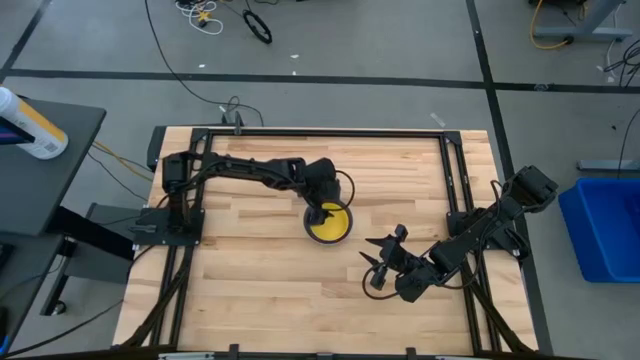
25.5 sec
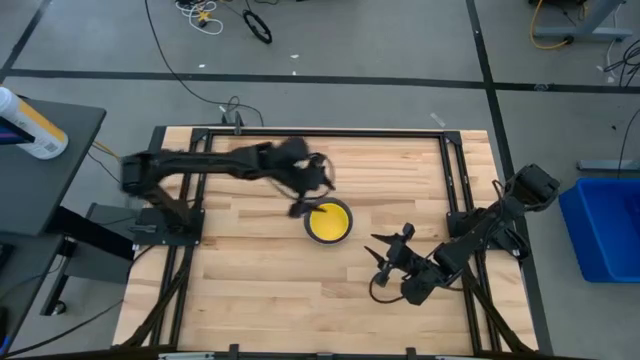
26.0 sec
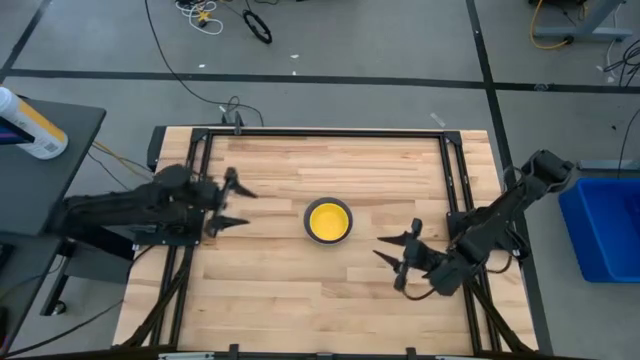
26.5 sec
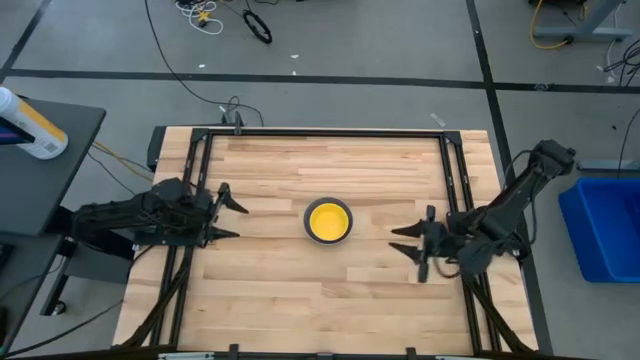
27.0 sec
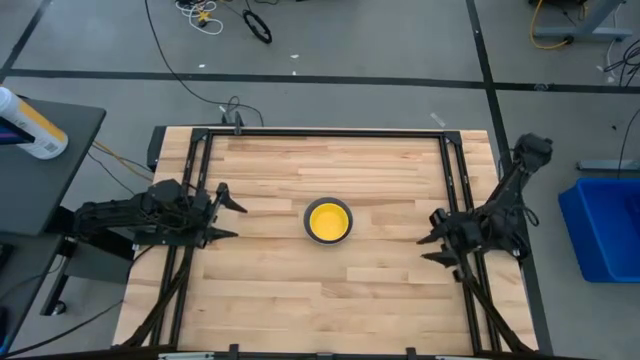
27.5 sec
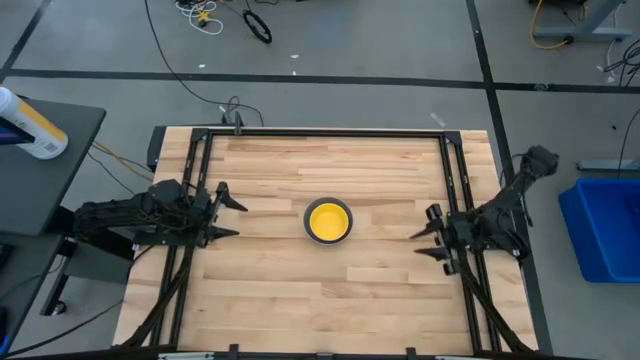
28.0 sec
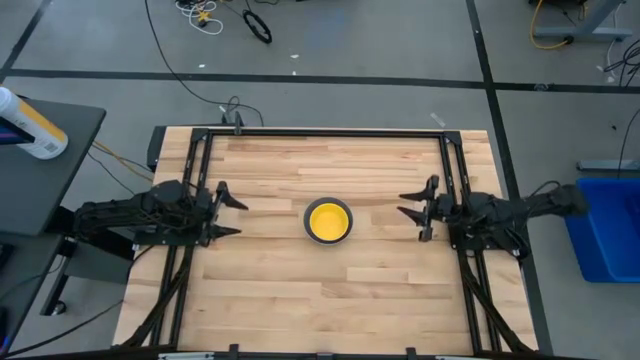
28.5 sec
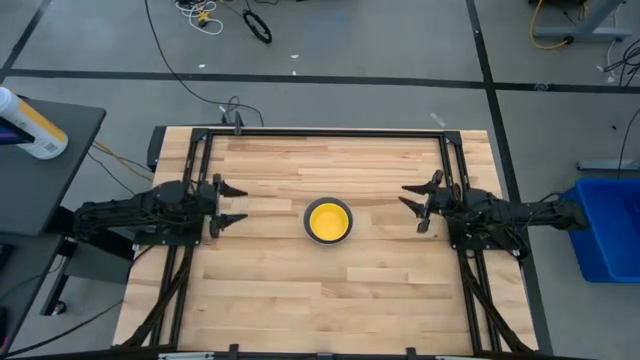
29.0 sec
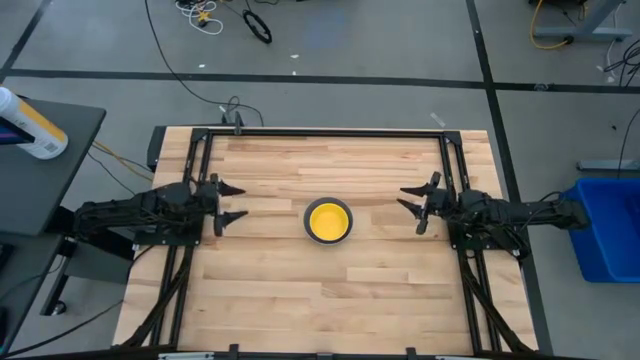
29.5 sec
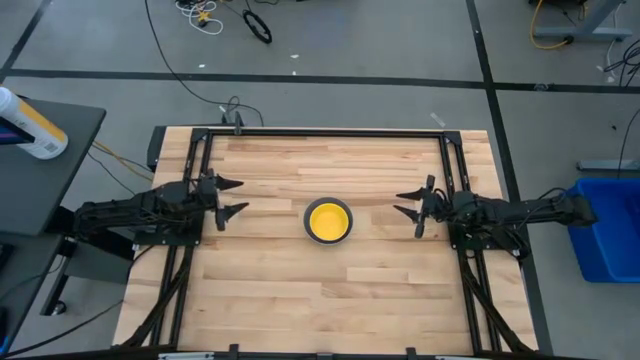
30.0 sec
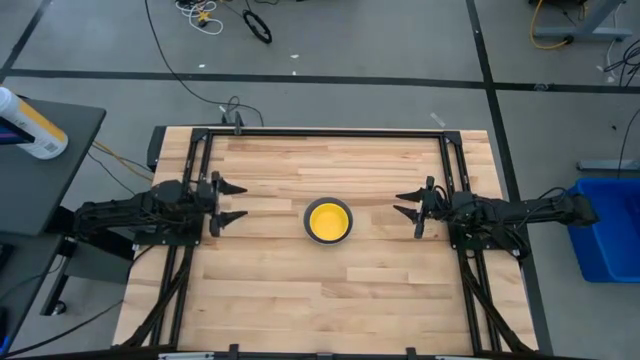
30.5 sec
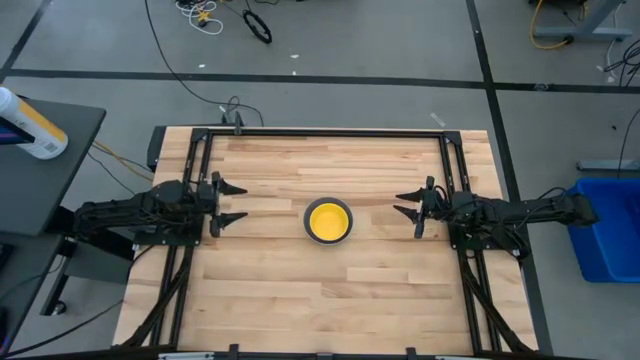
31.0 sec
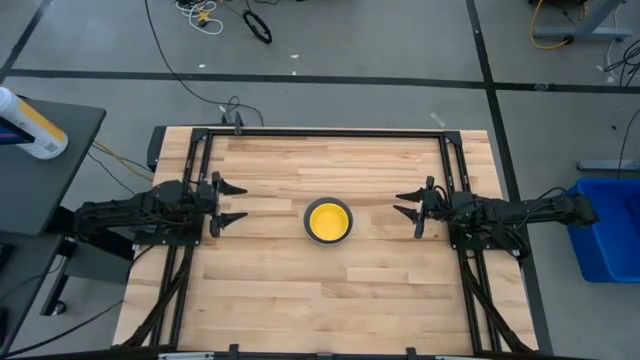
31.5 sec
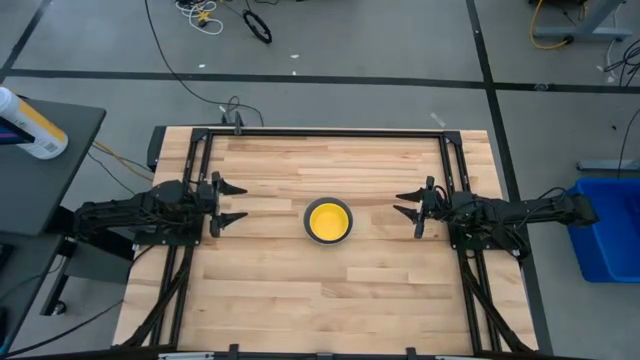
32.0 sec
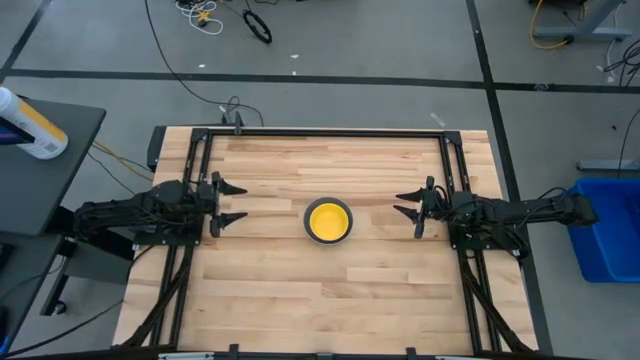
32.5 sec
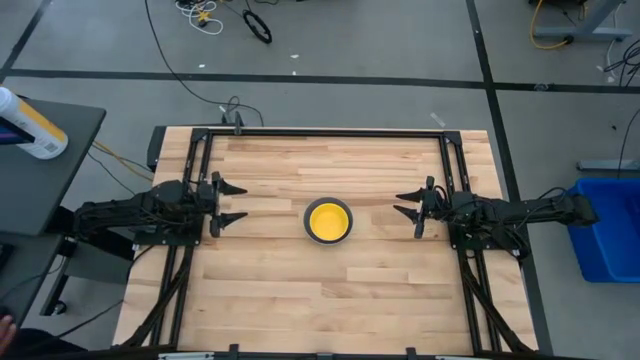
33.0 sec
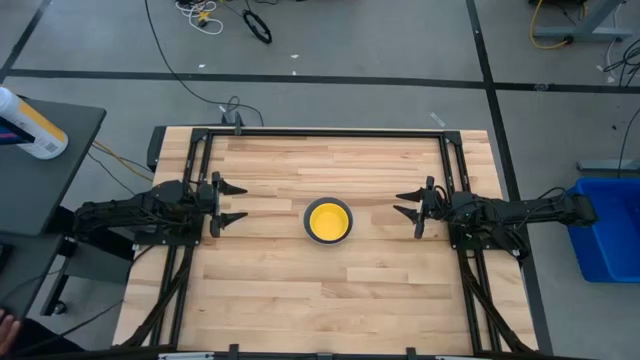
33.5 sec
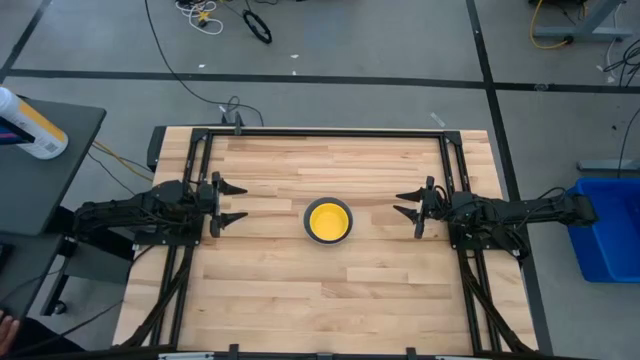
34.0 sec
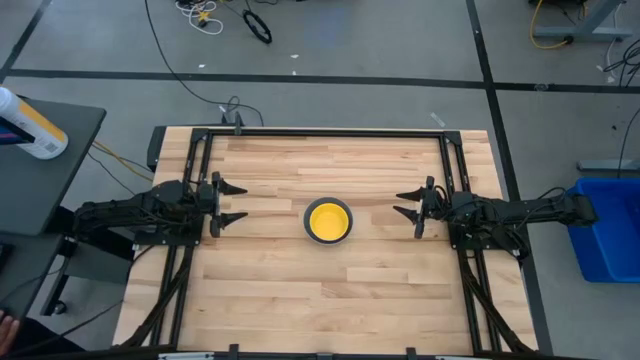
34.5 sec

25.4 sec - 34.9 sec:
Return To Home Position

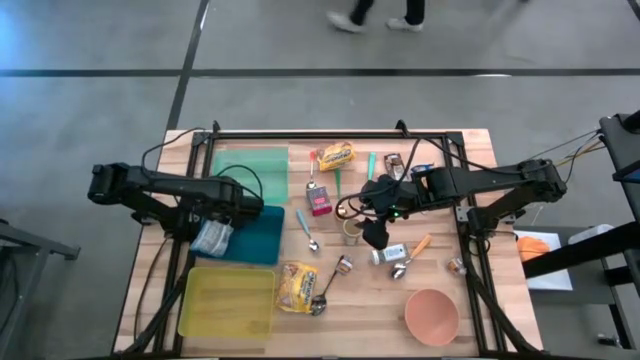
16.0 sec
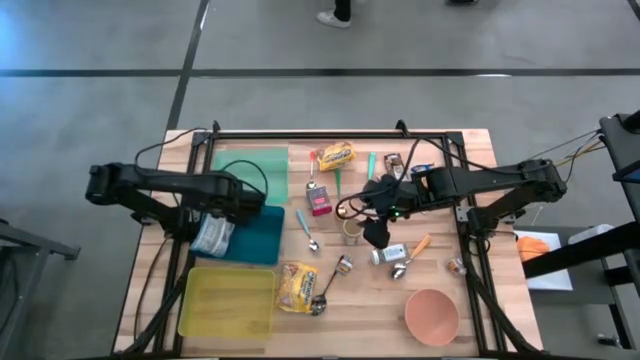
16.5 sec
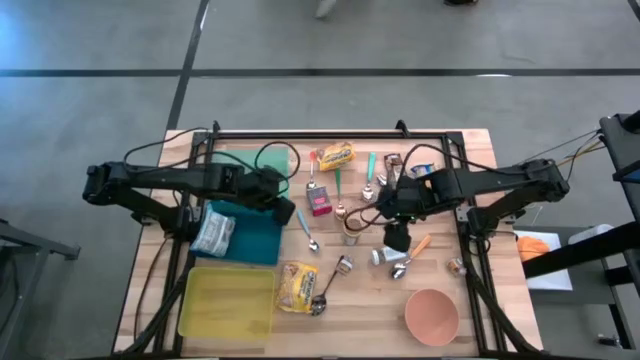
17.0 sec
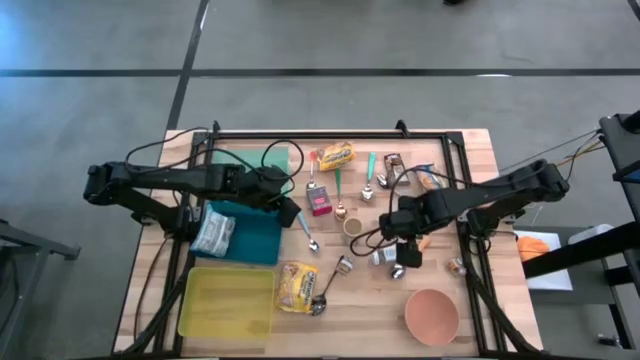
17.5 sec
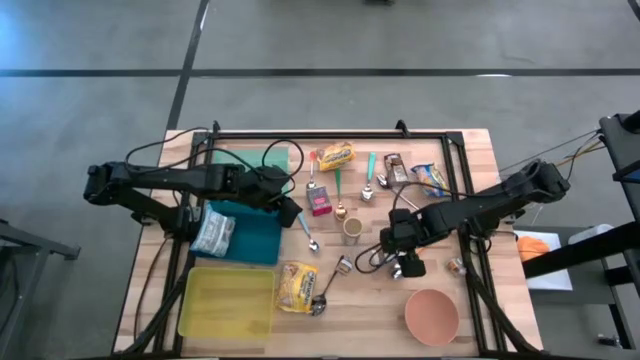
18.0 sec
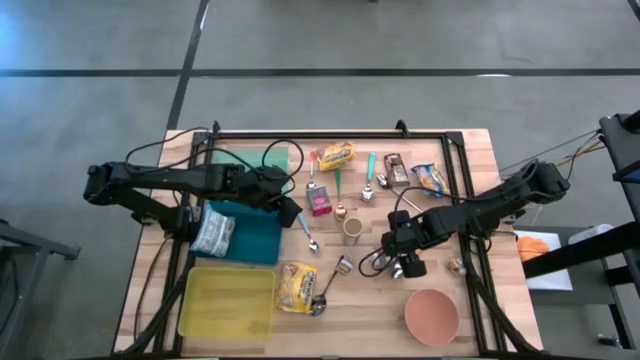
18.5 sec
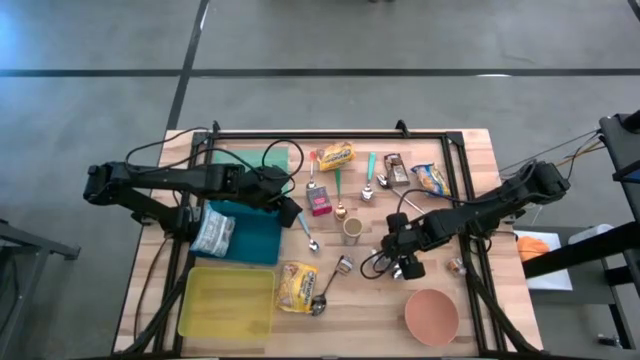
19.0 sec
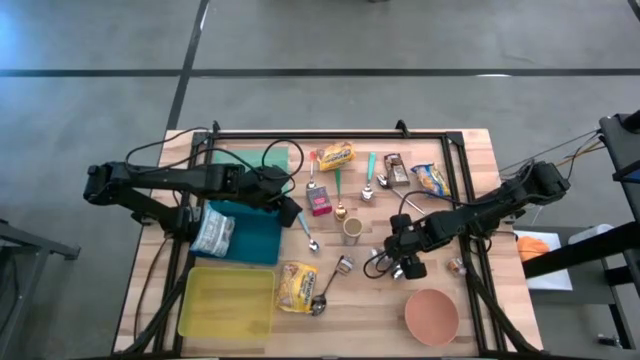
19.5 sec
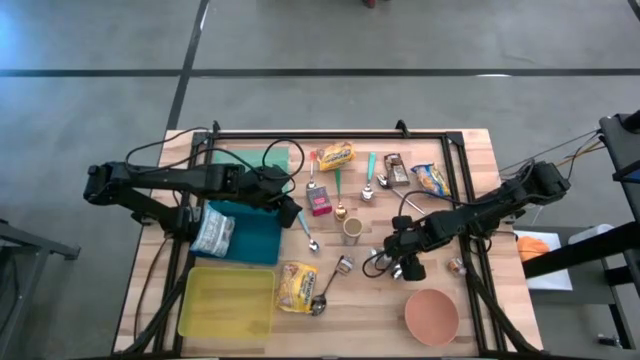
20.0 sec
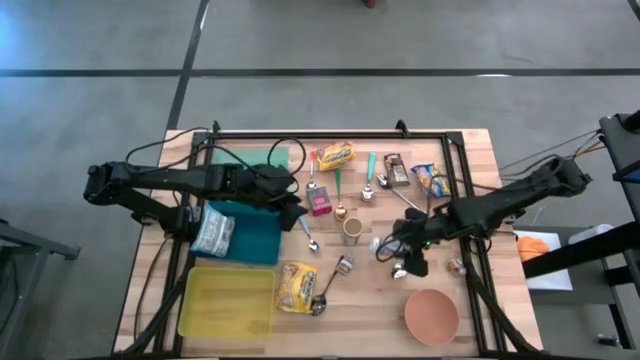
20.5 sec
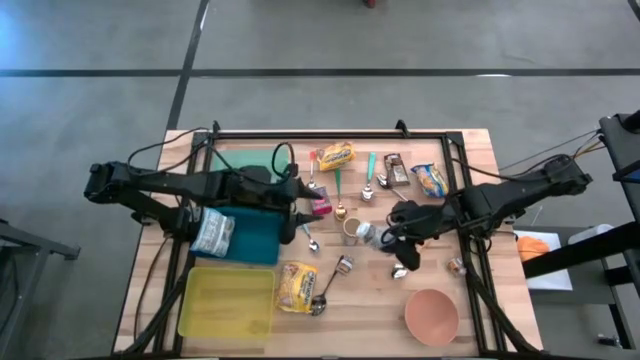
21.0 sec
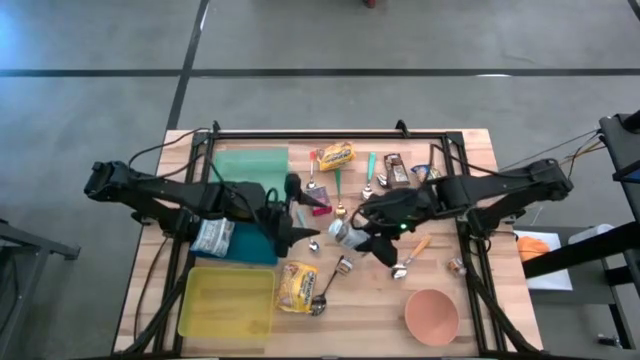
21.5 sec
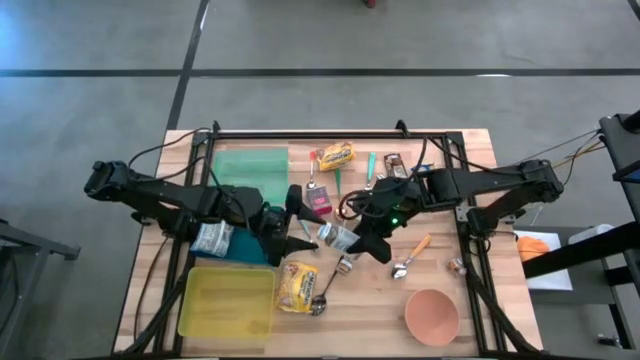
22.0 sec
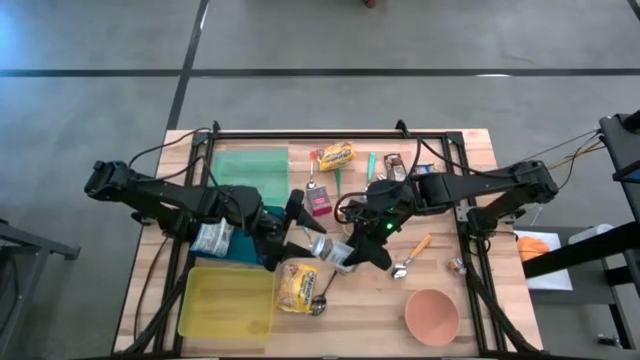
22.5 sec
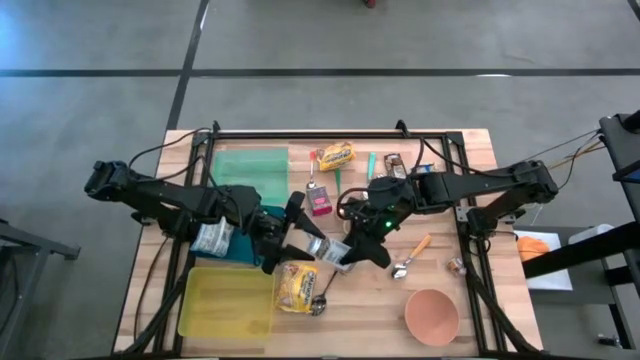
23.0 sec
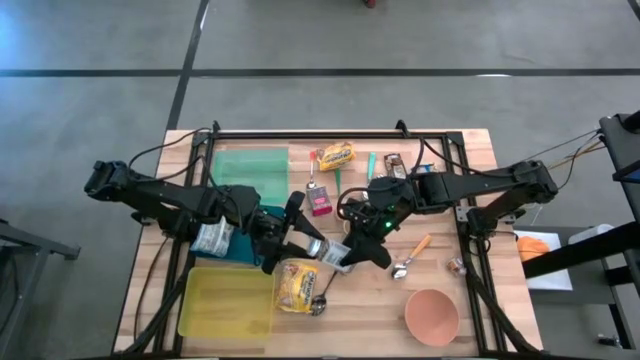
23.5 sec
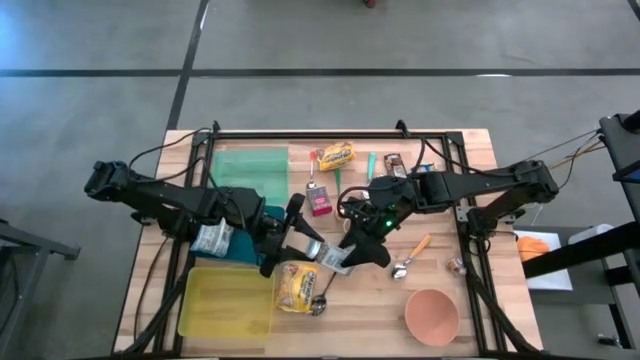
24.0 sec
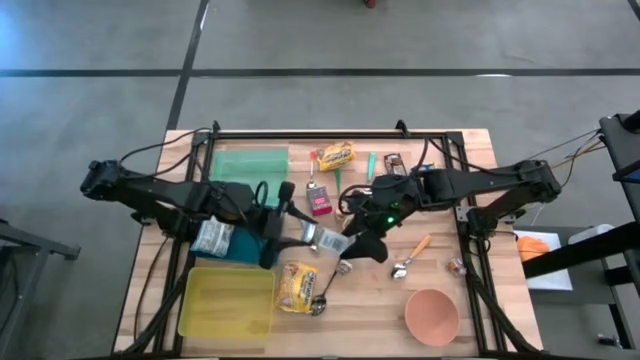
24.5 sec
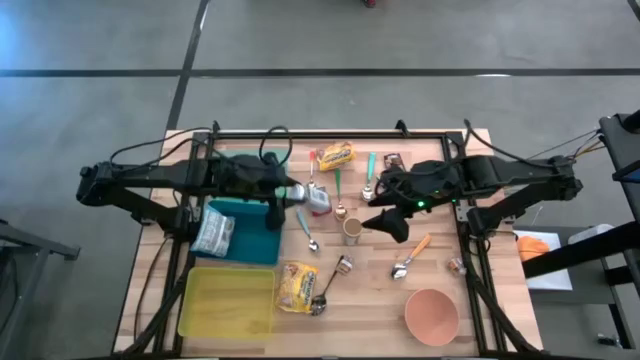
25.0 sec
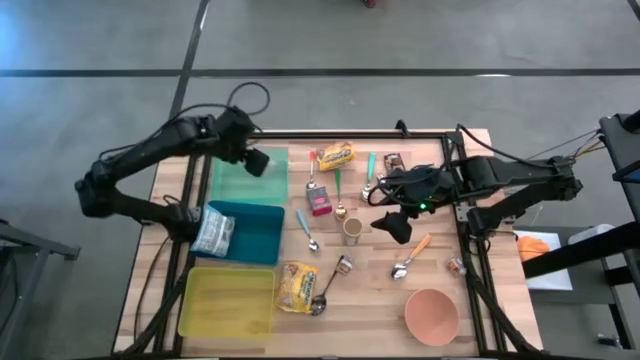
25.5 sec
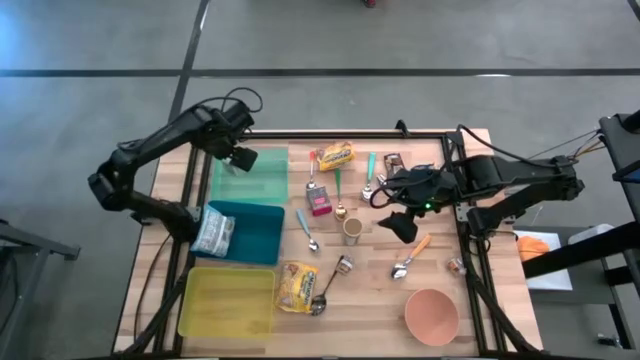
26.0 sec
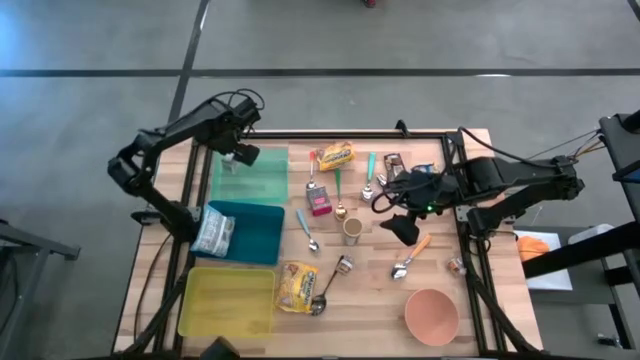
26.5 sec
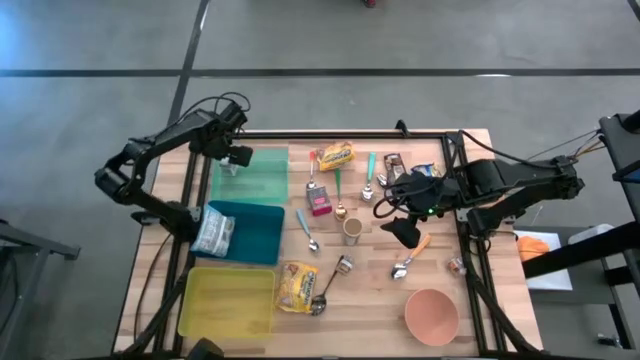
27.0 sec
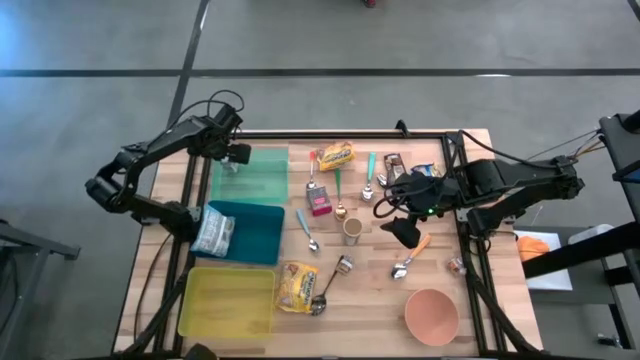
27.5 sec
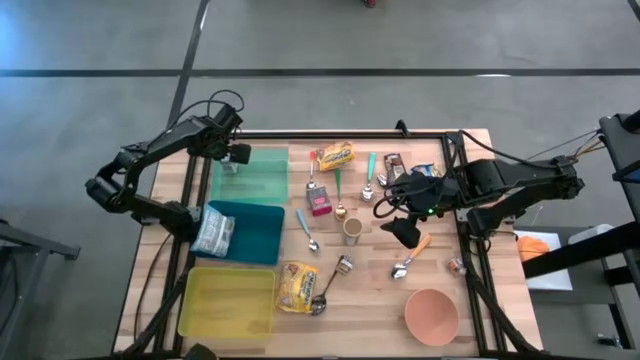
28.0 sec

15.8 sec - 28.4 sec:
Put the white seasoning bottle into the light blue bin
